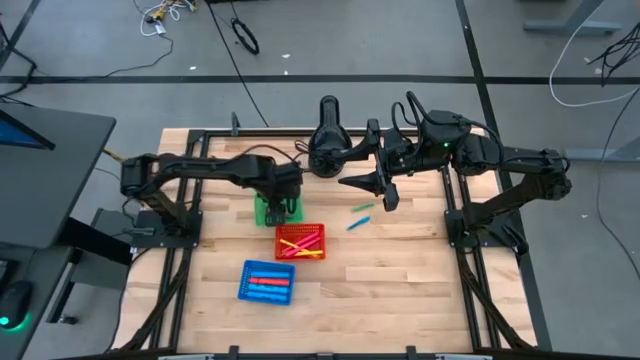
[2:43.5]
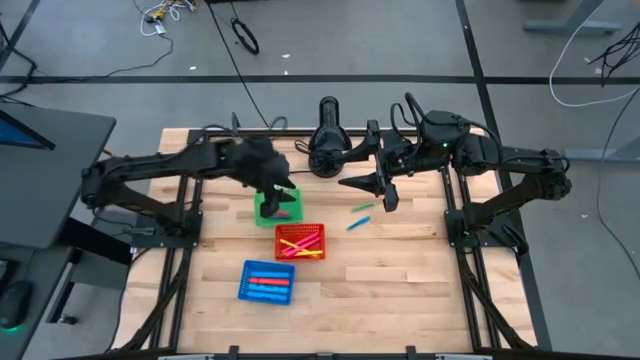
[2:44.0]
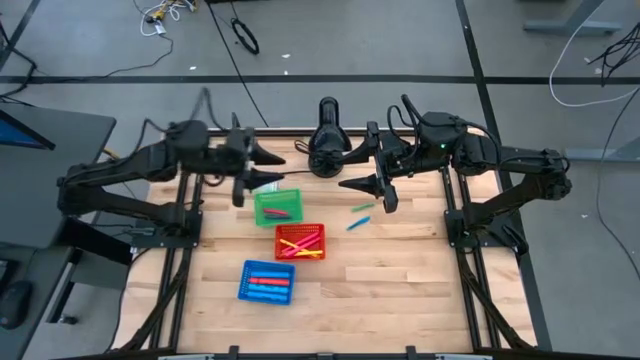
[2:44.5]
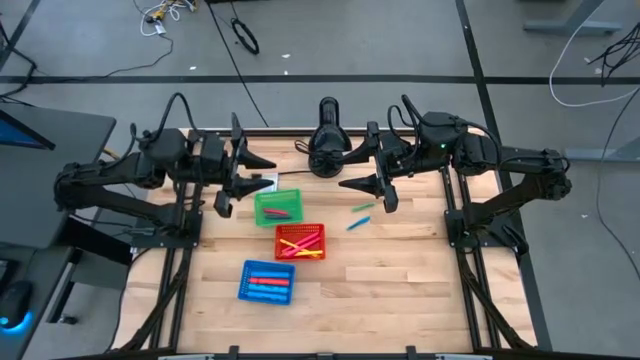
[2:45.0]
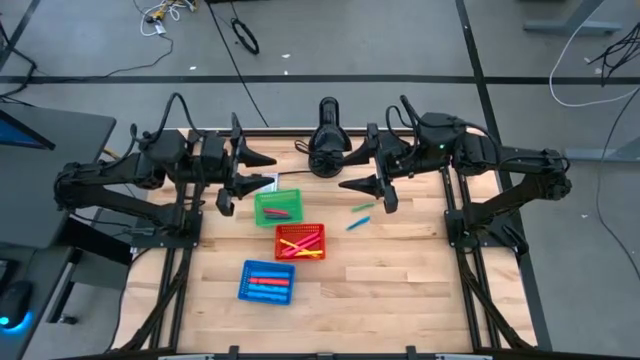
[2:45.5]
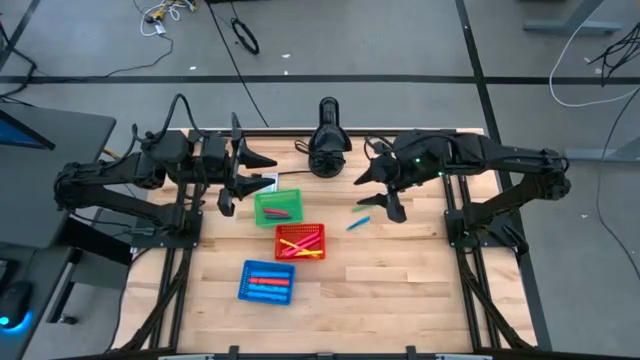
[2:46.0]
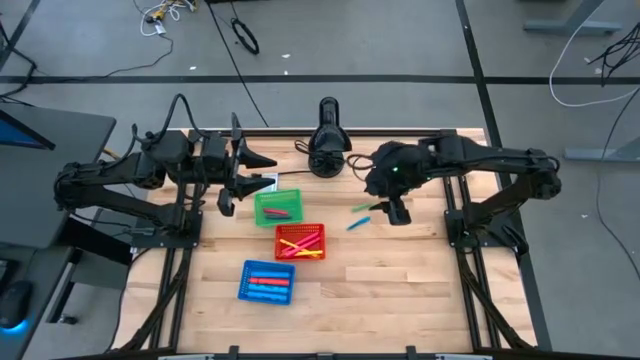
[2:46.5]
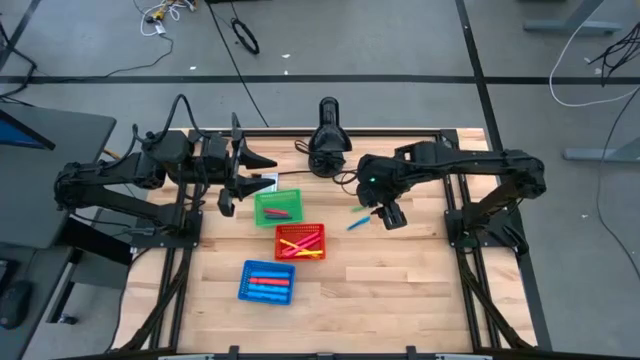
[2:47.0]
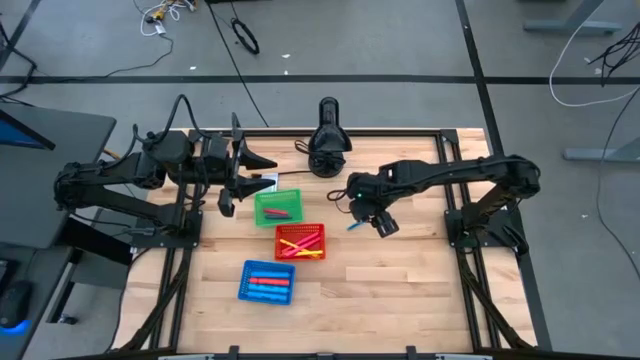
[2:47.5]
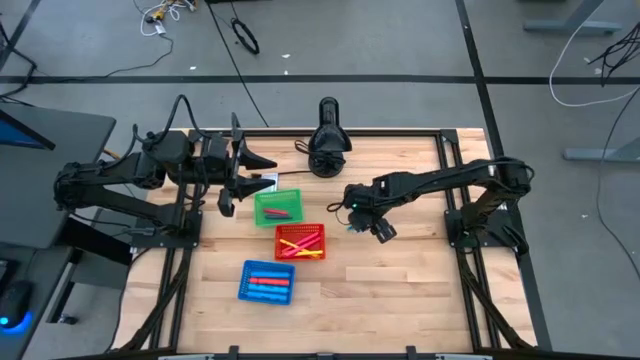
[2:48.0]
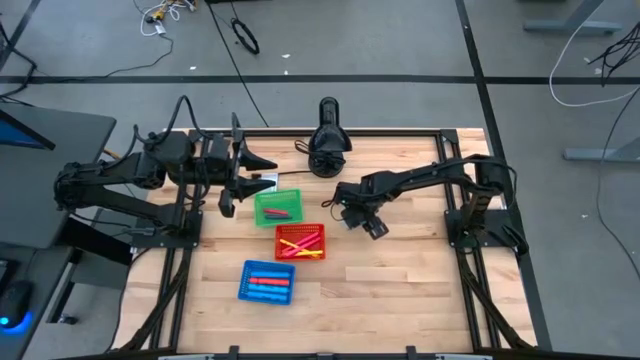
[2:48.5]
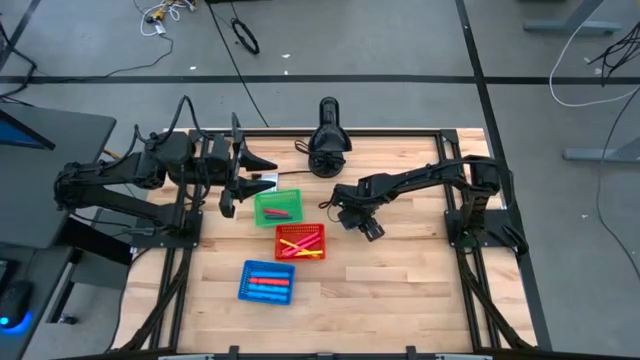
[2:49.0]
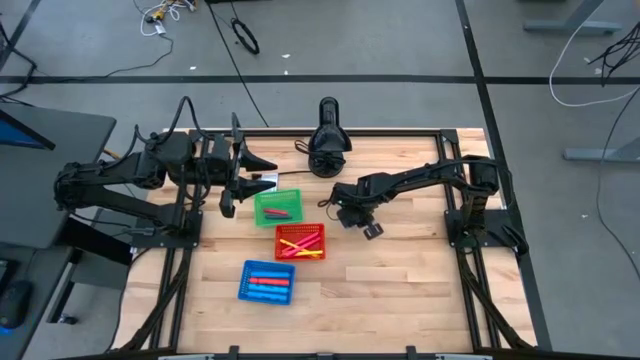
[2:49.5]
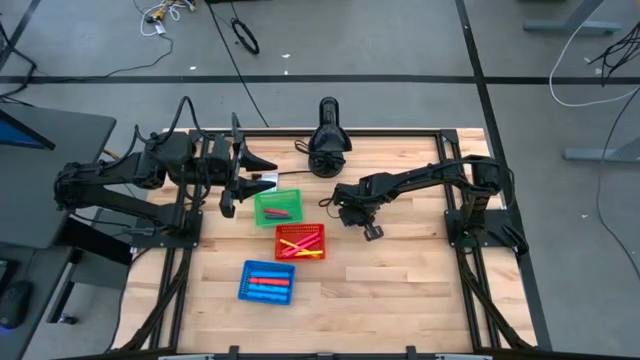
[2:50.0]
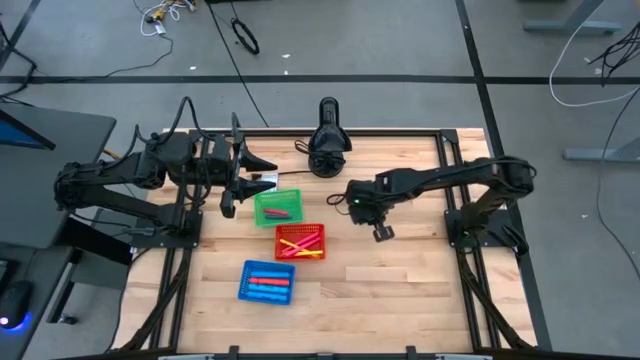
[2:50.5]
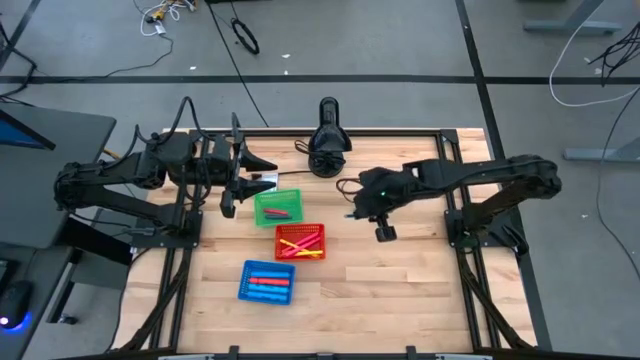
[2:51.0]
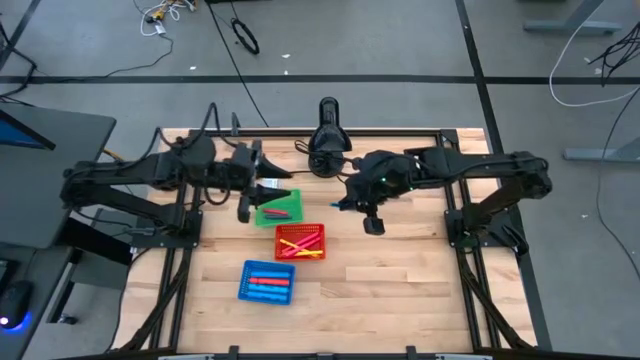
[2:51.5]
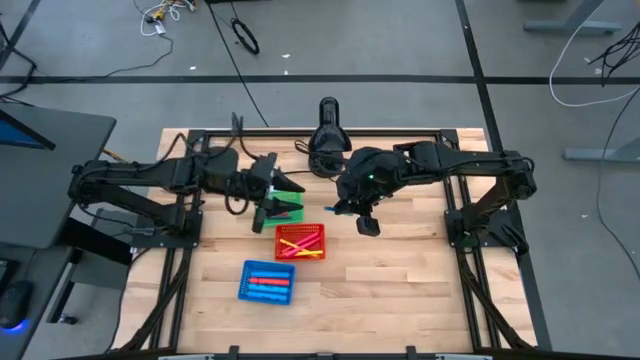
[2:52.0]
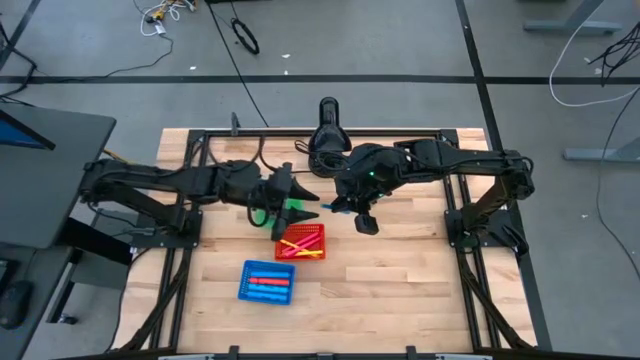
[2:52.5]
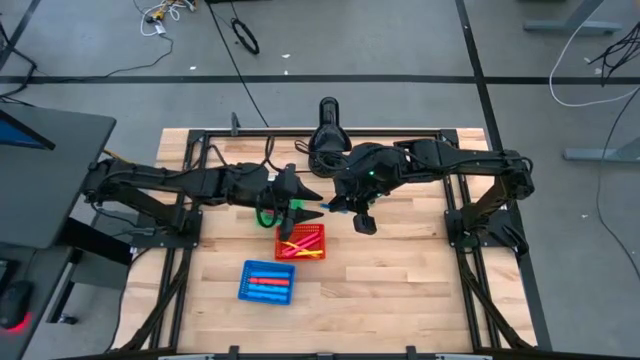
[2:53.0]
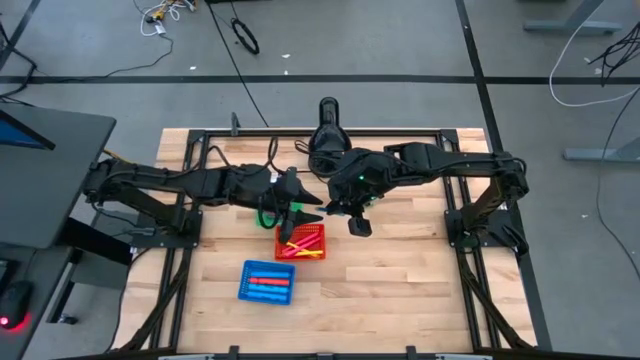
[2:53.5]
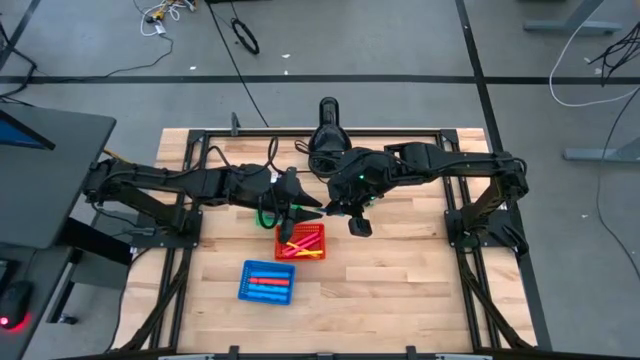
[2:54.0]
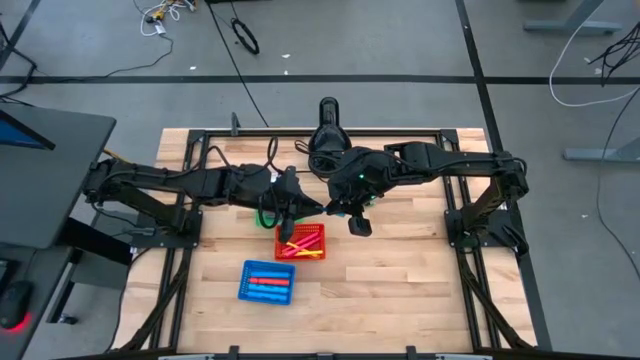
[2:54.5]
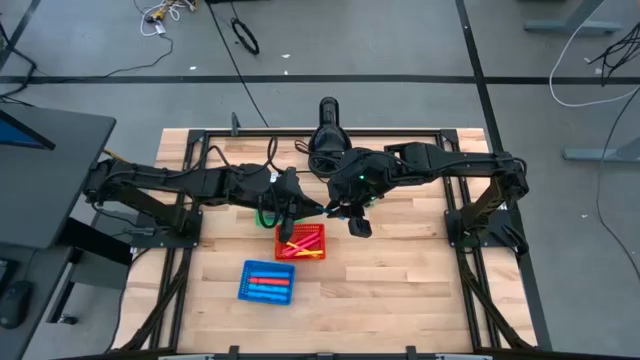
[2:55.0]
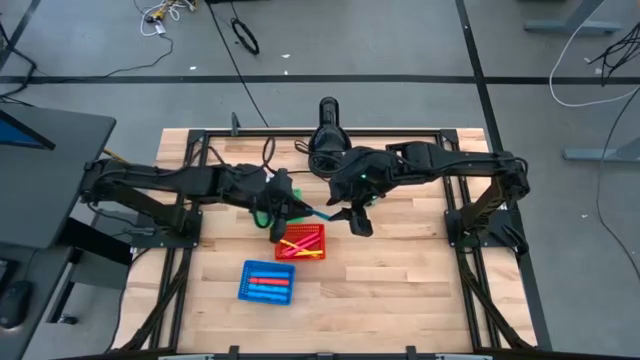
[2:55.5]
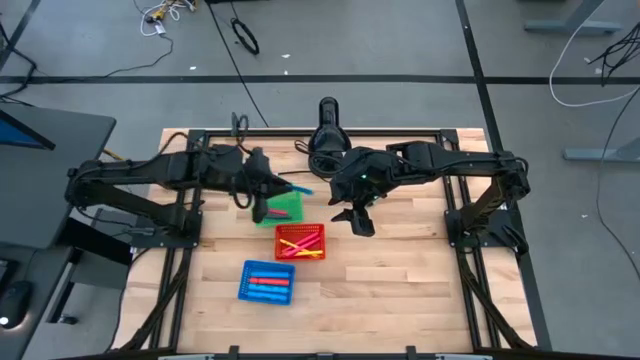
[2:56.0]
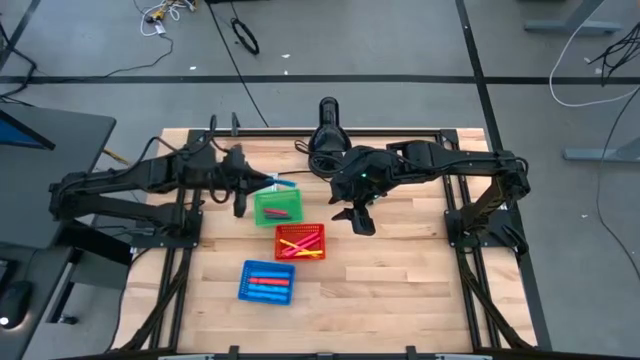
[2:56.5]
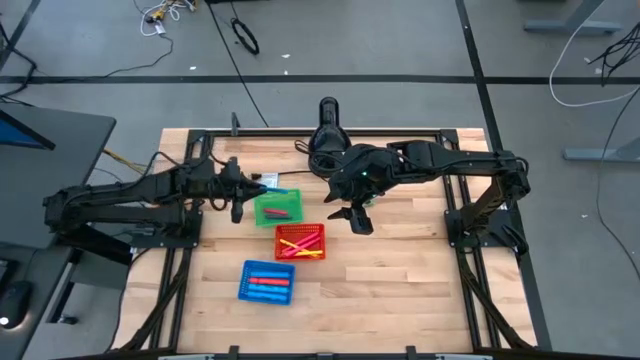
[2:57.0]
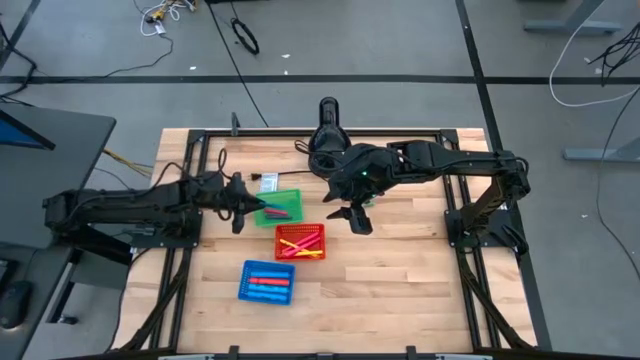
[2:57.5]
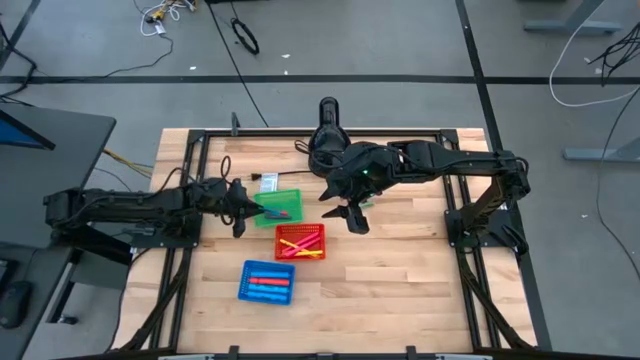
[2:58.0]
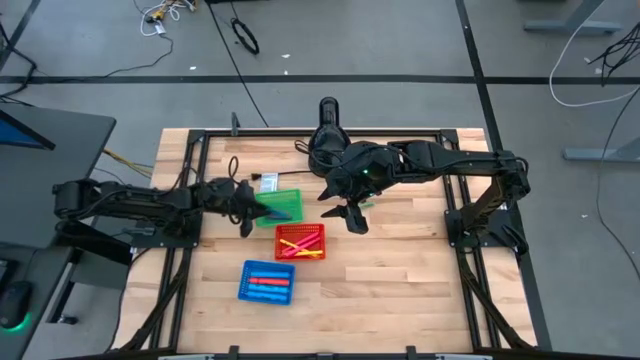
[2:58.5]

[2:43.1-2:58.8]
Task: Pick & Place Markers
Put the blue pen into the green bin

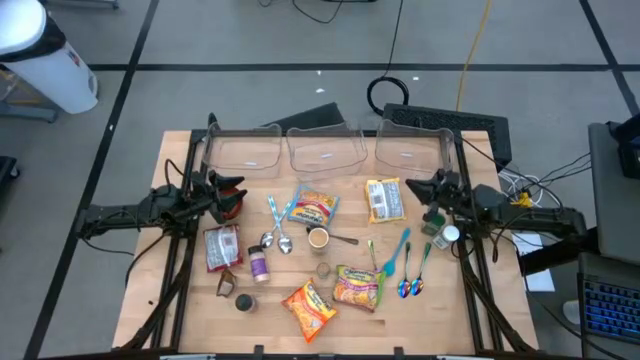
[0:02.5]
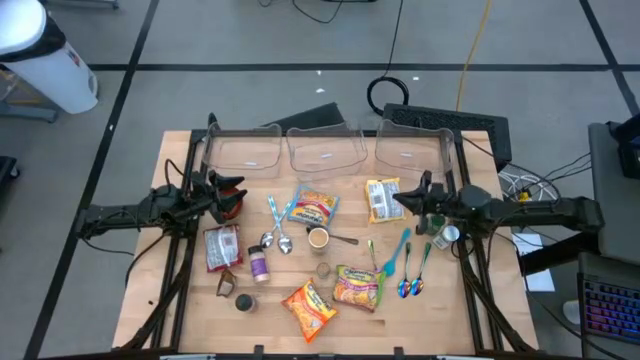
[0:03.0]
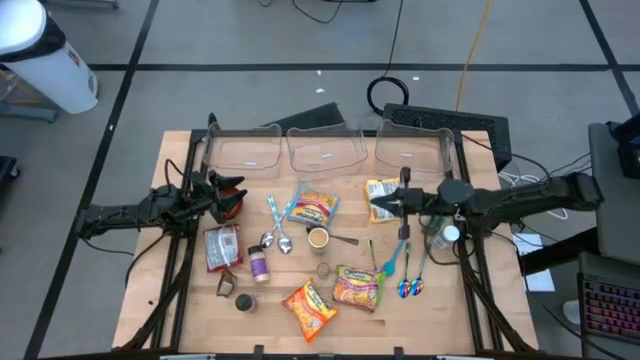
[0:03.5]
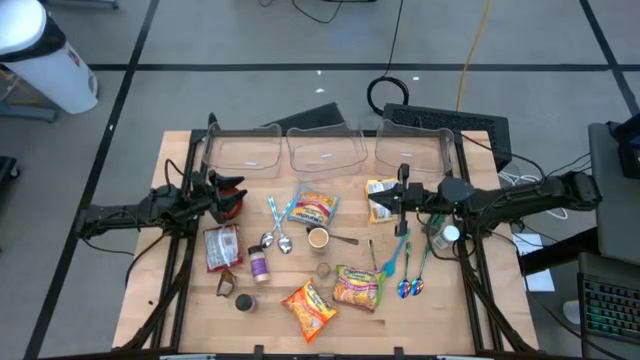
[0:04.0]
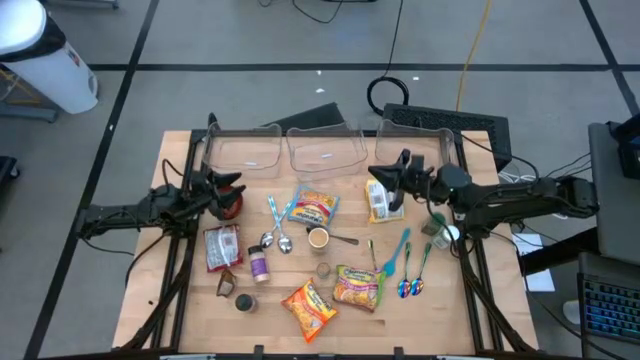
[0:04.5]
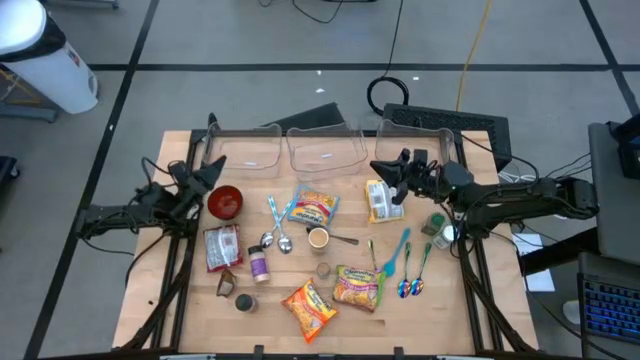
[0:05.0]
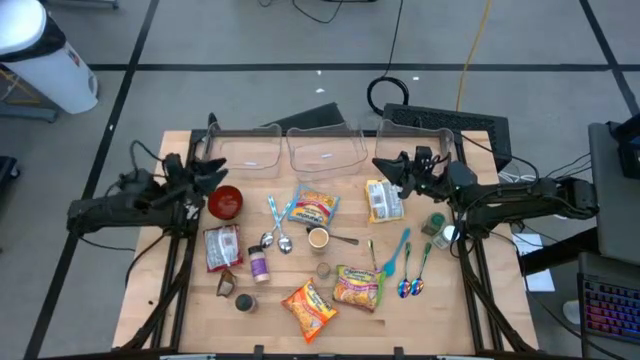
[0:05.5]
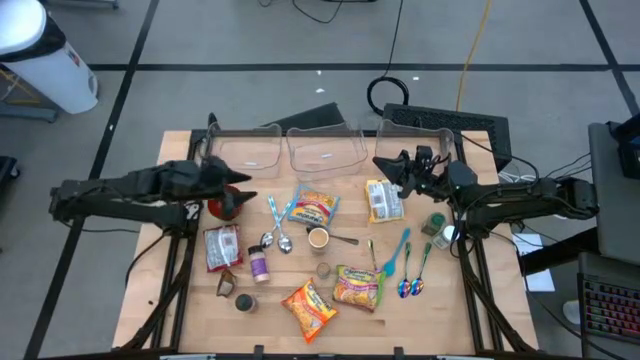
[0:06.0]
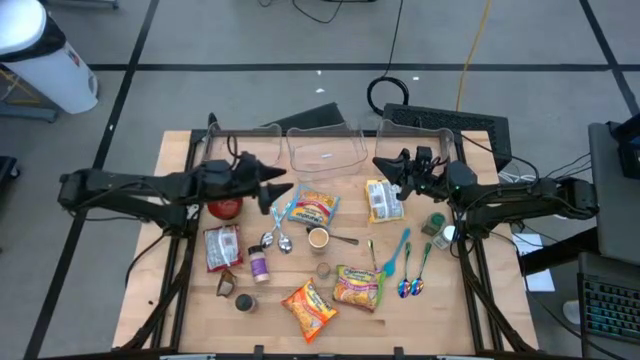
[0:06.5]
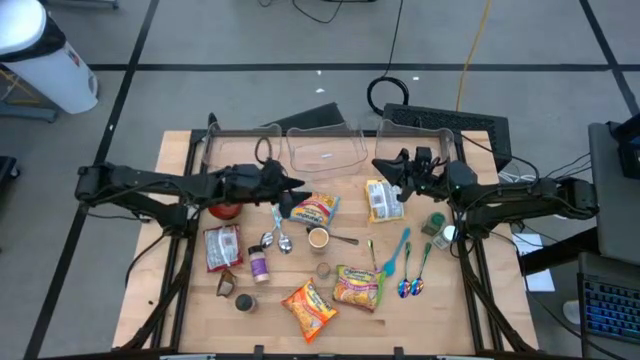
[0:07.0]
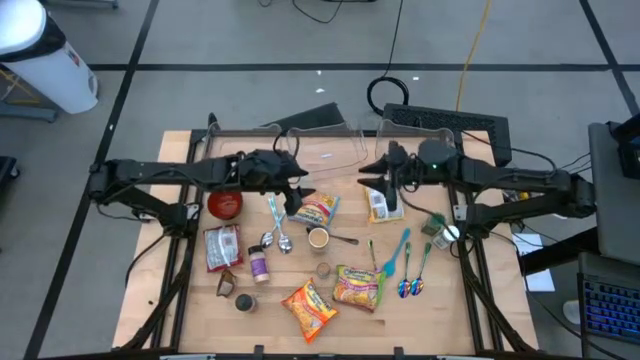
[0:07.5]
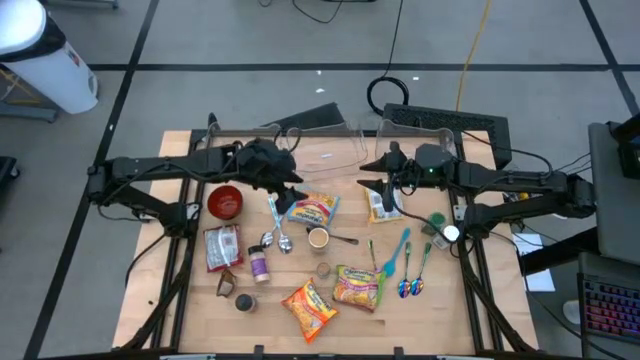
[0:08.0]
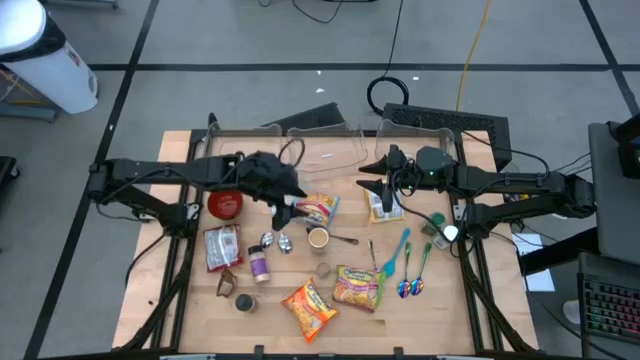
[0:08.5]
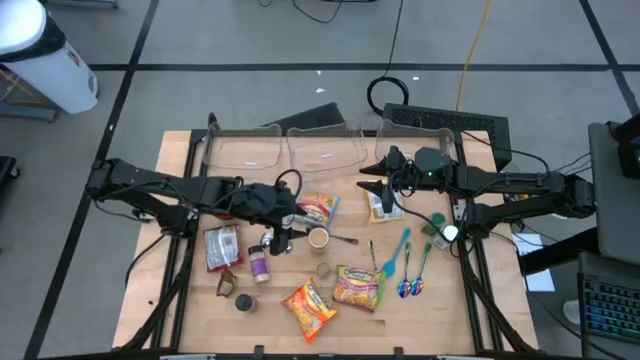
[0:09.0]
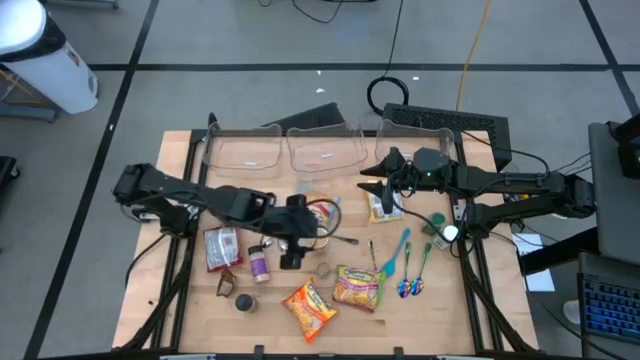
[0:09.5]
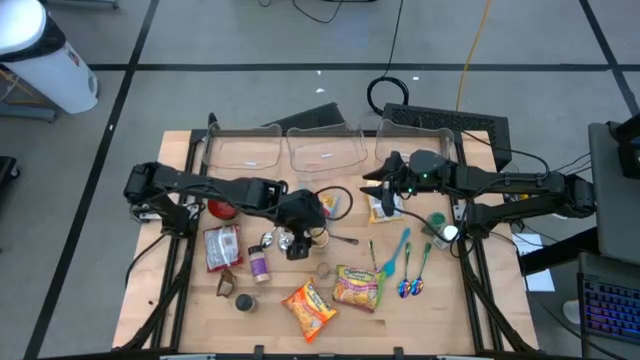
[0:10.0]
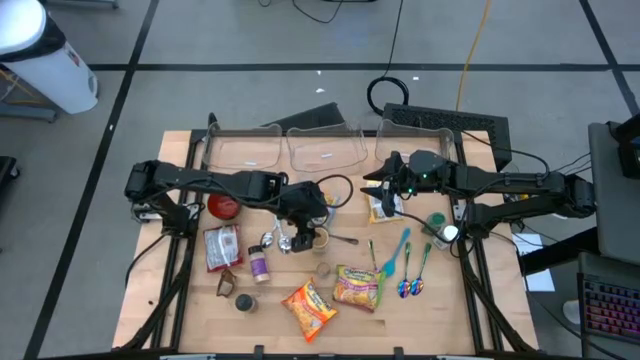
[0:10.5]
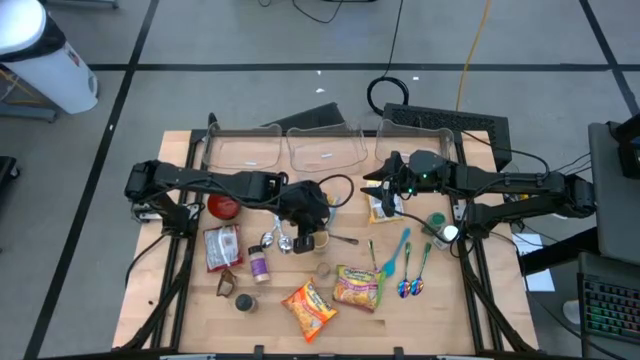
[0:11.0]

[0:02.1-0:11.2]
Task: Pick & Place Food Item
Put the gold seasoning bottle into the left transparent bin
